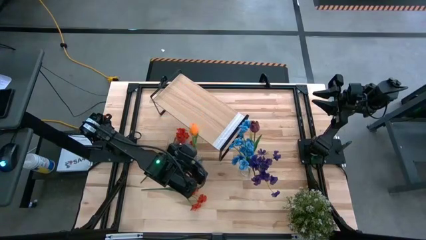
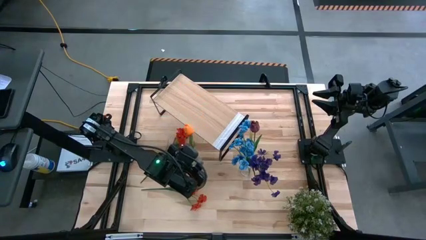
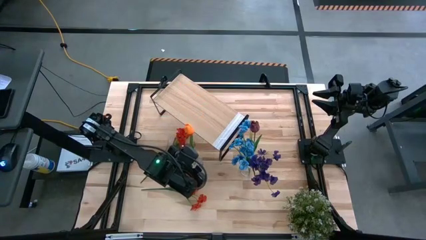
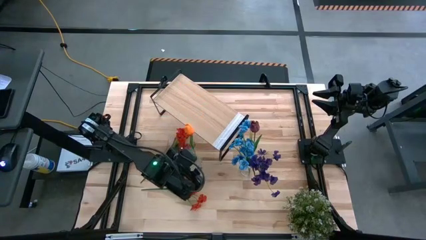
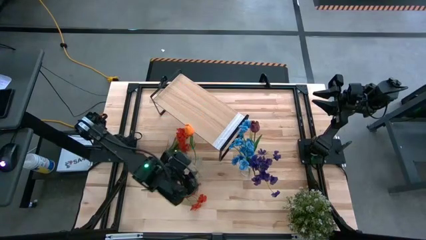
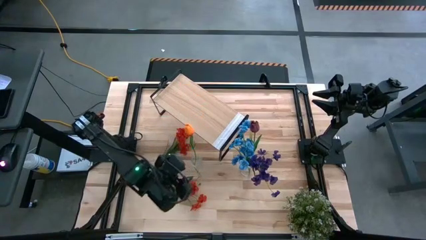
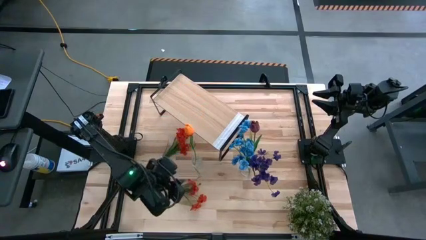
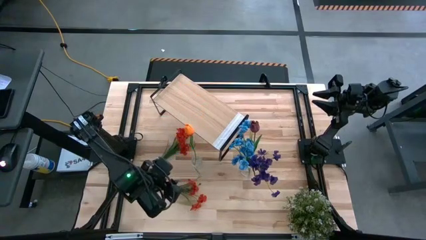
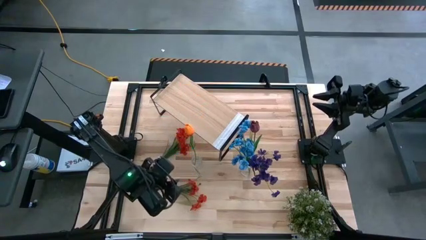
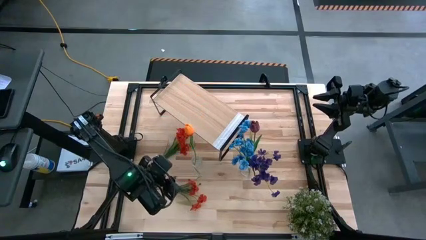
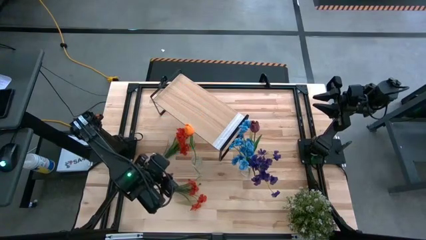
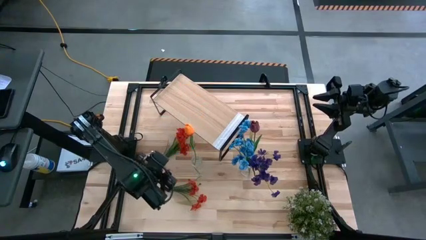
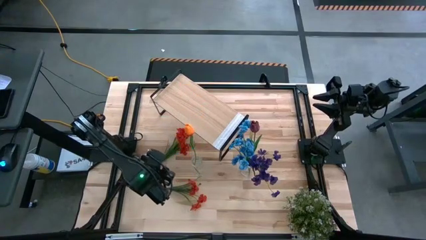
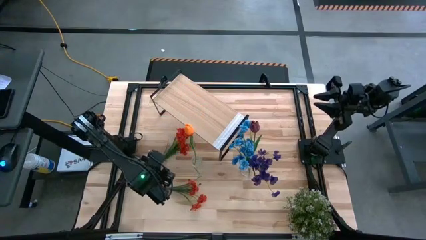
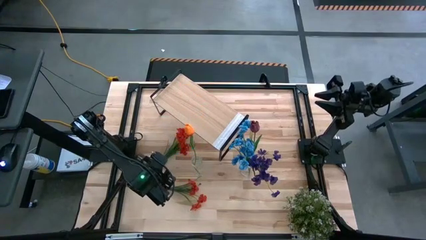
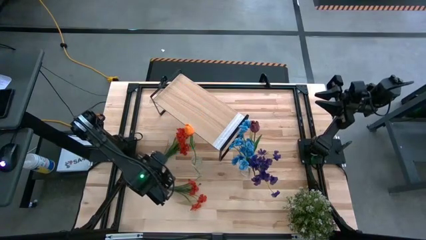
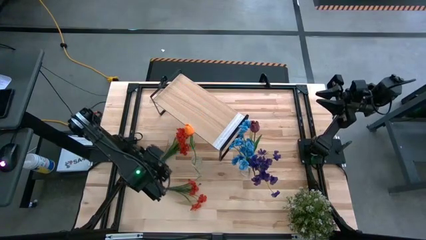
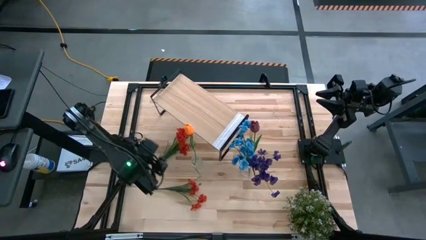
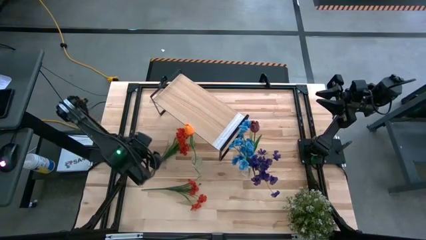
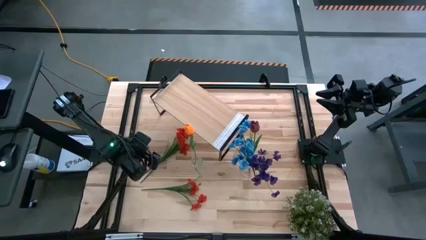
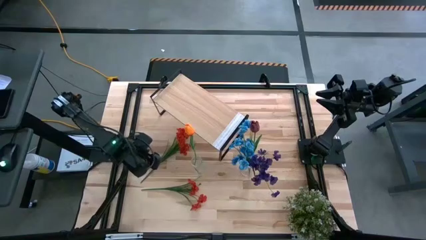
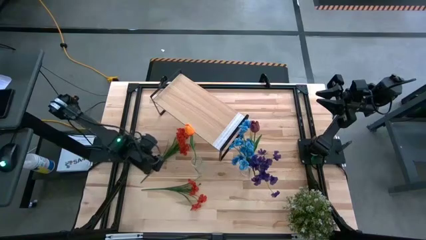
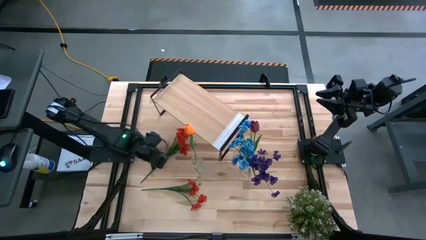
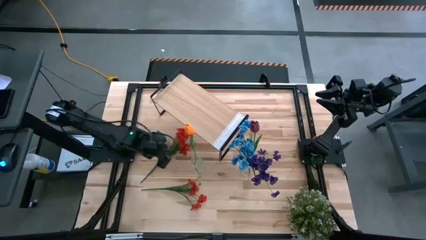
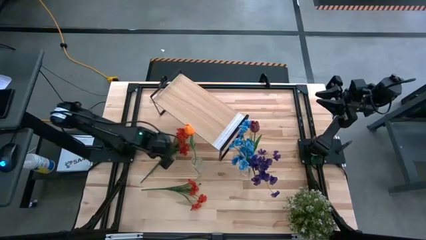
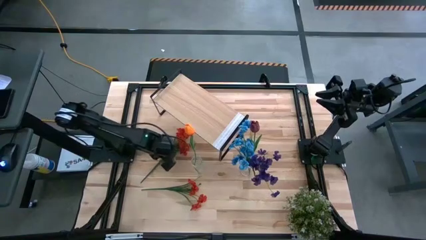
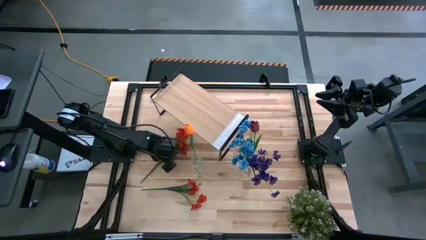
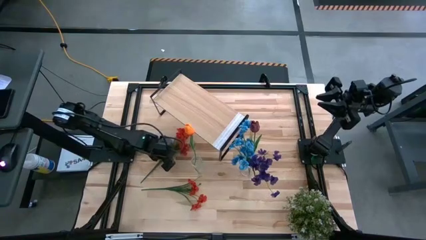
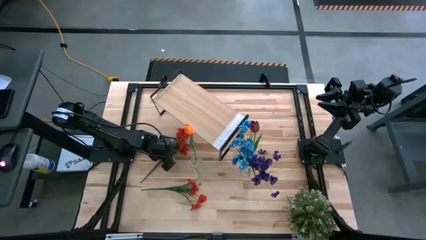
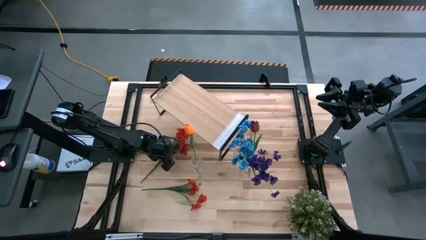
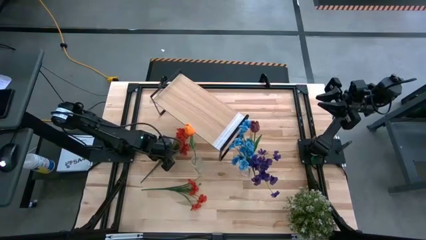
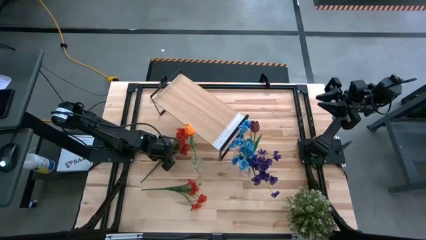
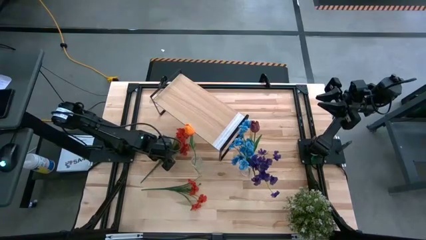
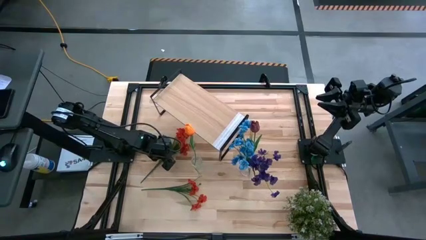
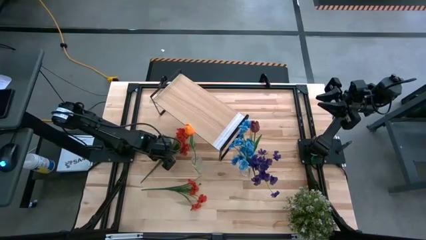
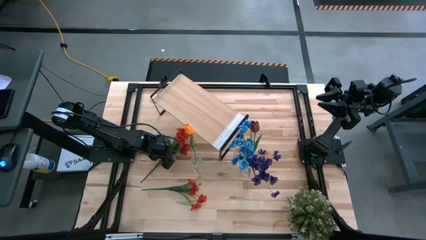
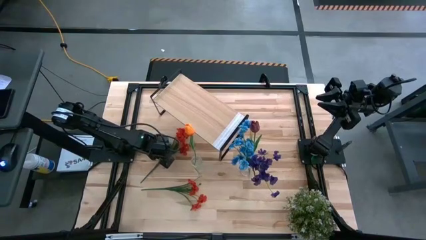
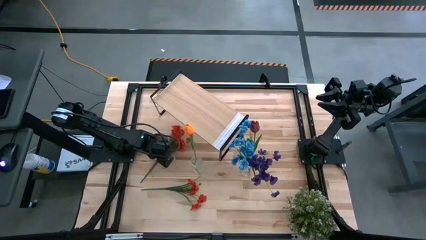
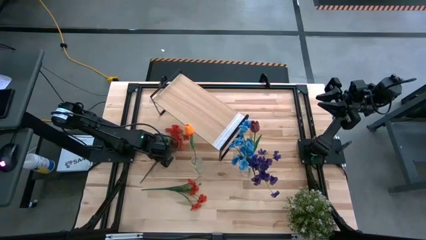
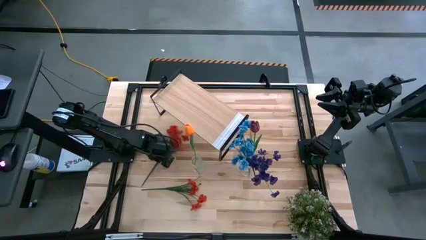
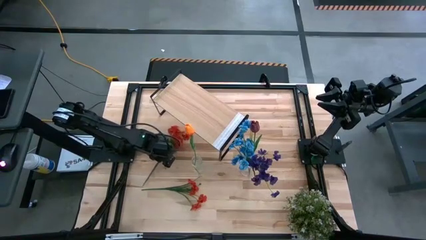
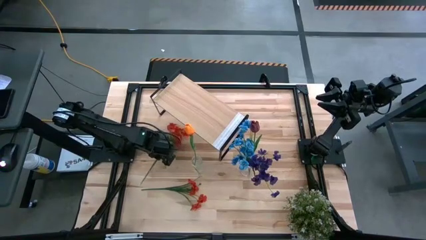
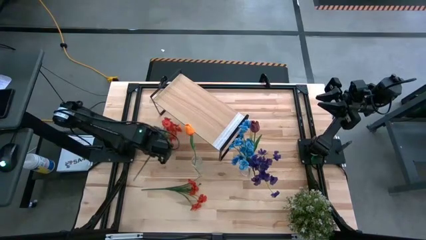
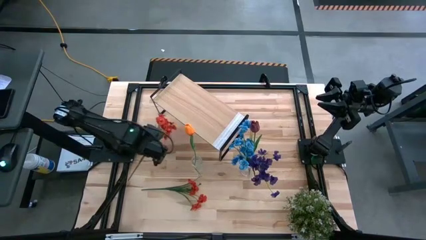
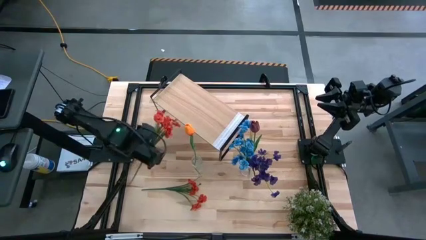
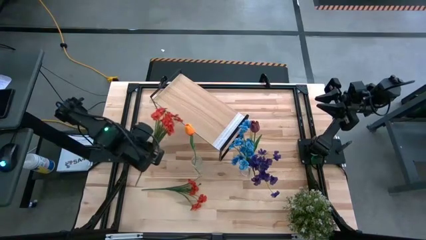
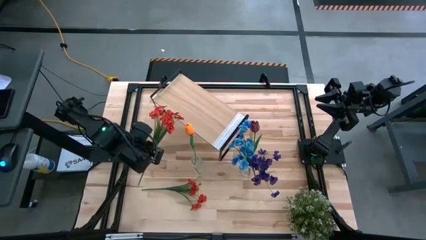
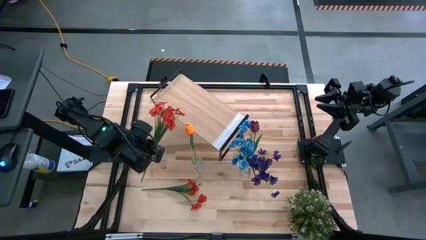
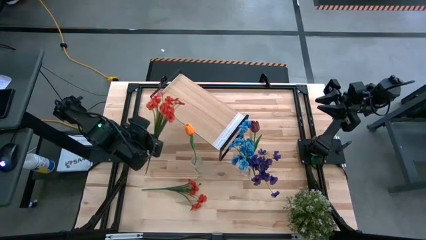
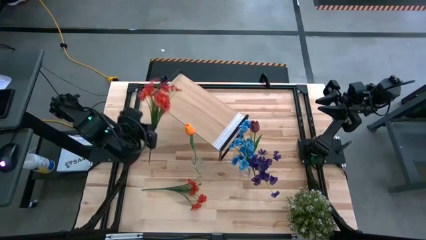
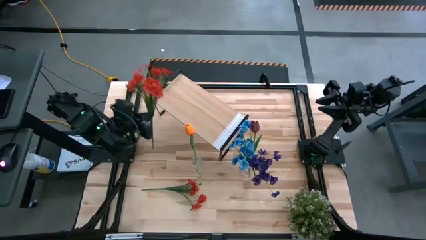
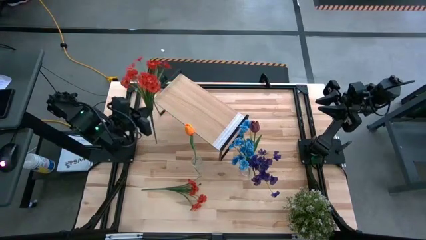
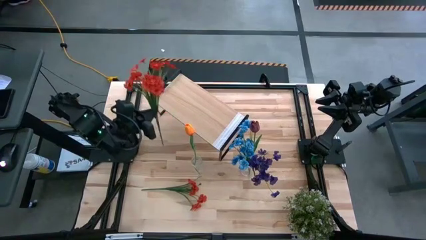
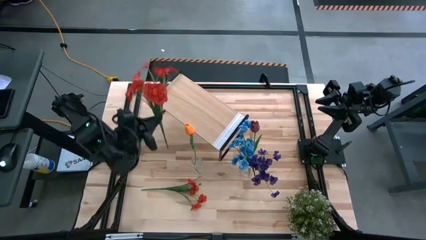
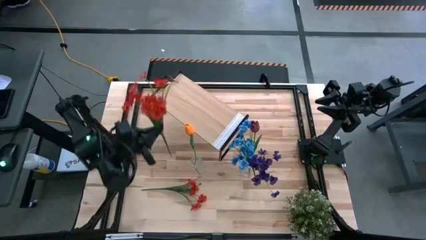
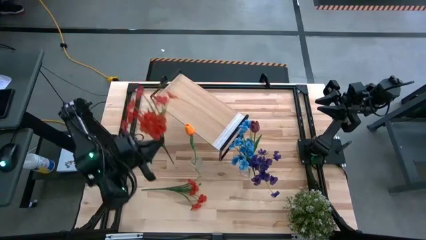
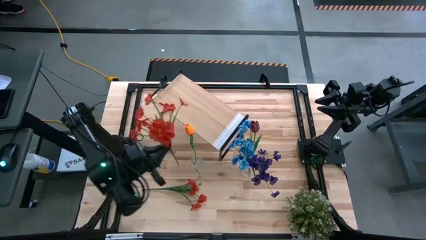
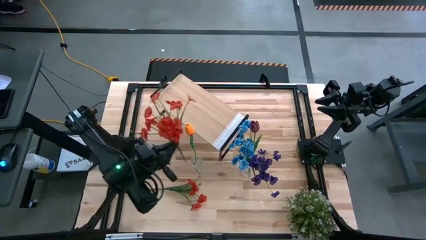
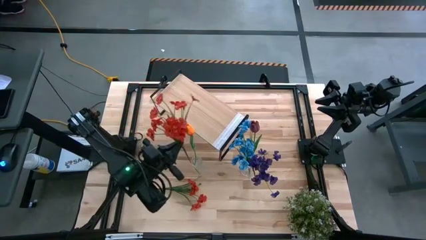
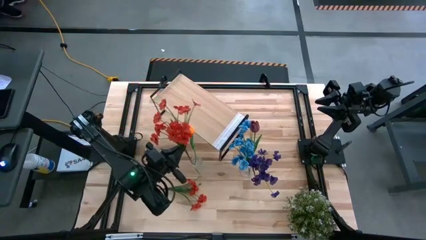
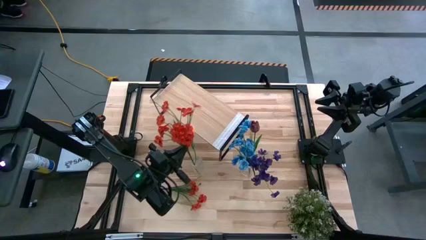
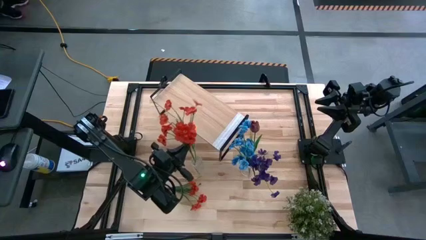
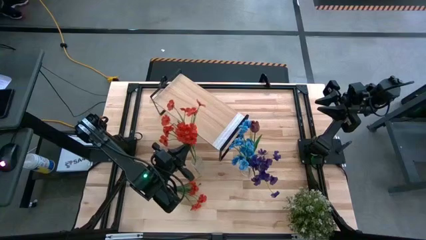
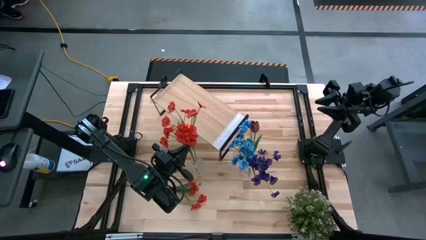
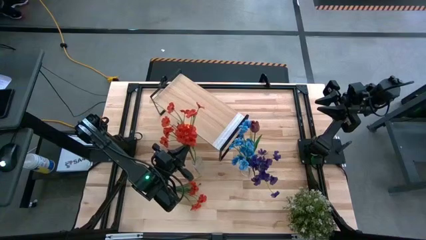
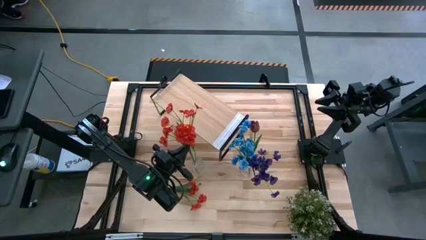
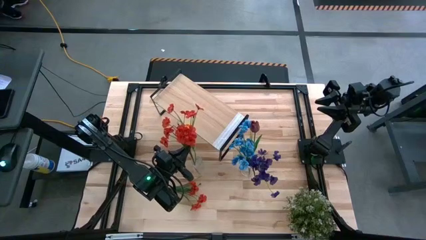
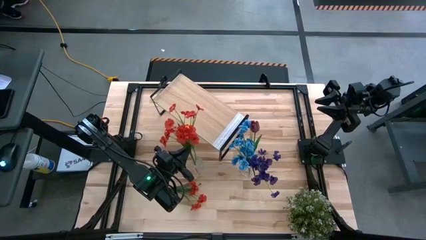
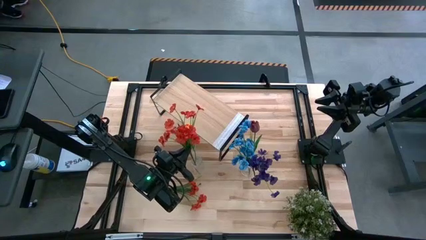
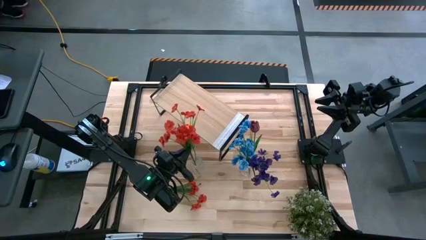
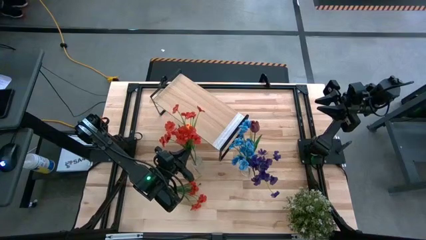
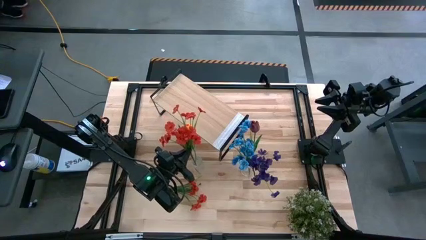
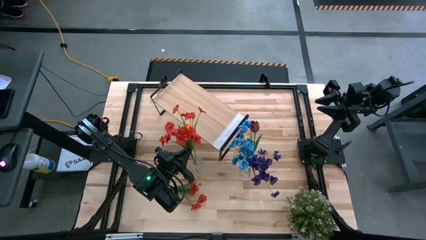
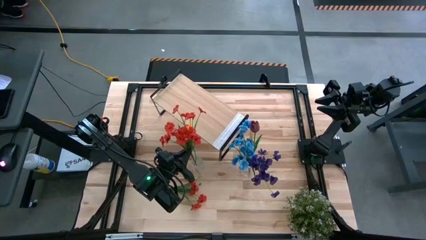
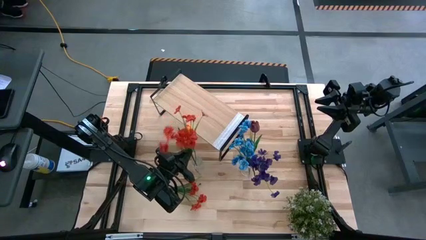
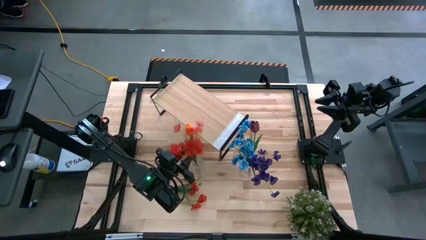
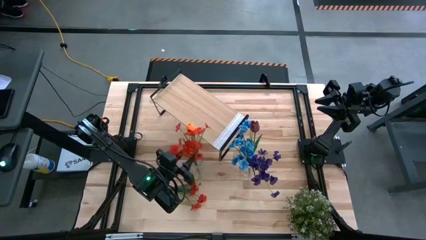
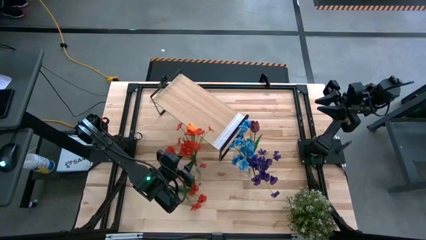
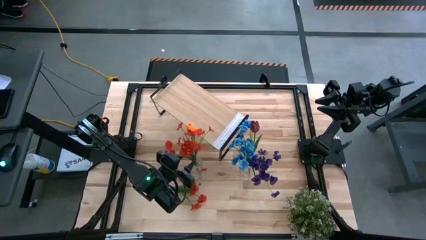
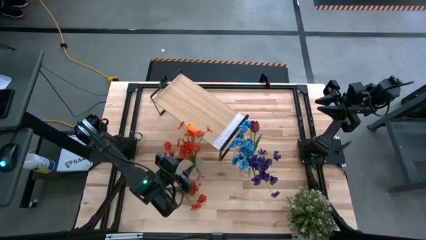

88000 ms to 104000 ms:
Task: Pick and place flowers into a vace then onto a shelf
Put the top red flowers into the left transparent vase

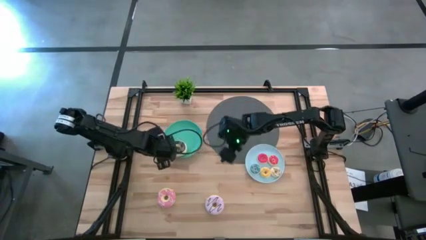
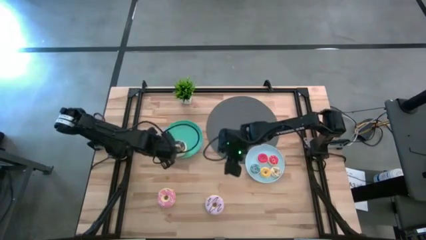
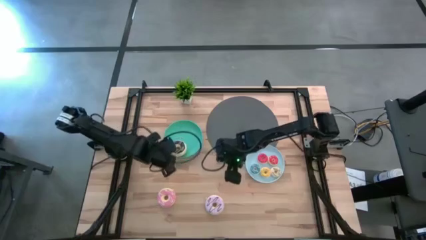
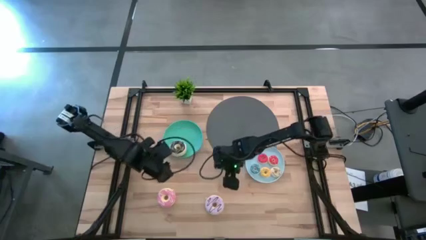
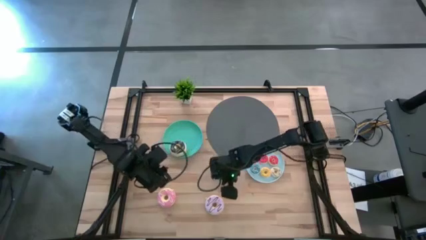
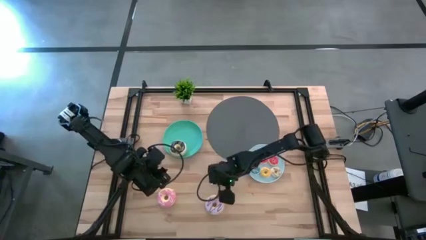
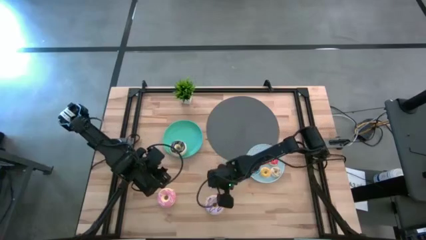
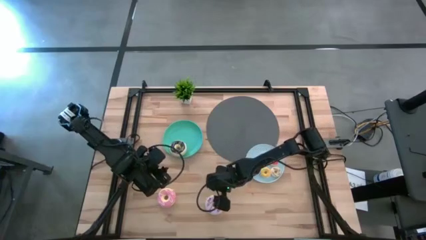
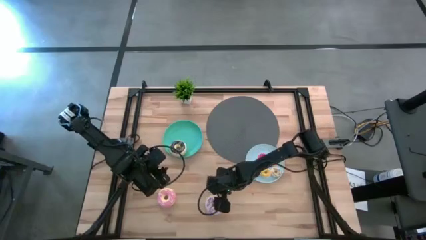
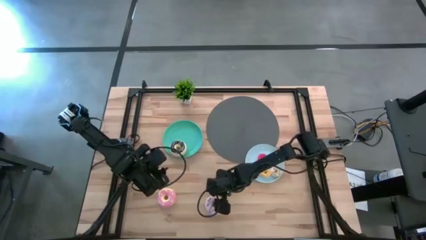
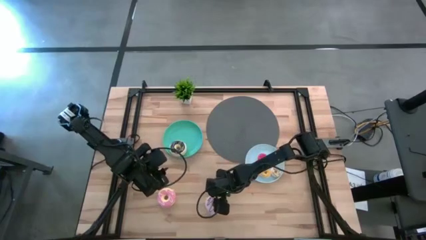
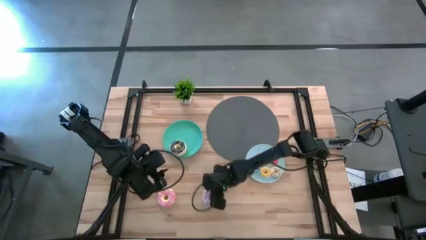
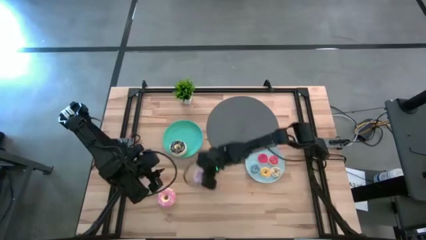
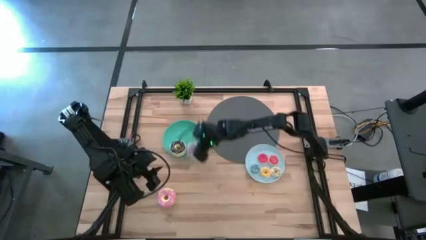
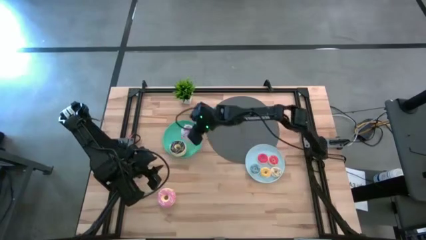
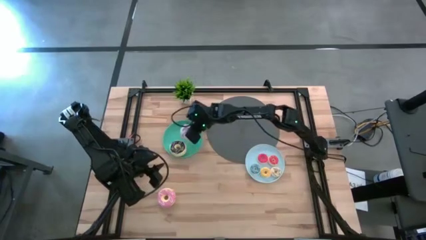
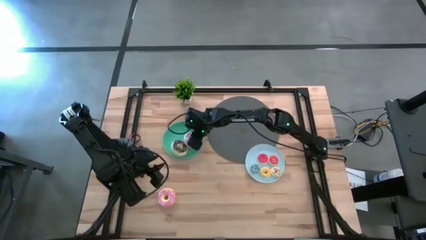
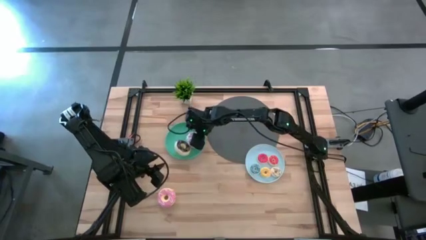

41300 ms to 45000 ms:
Task: Pick & Place donuts
Put the big purple donut on the blue plate
